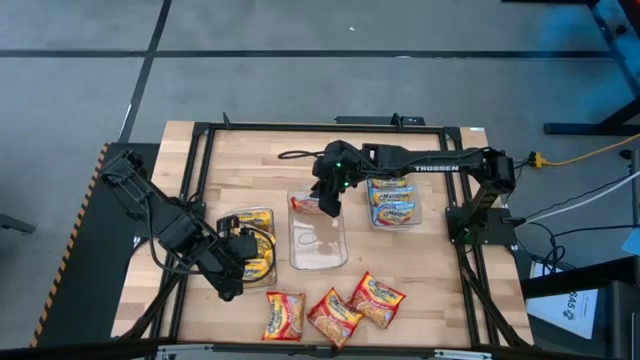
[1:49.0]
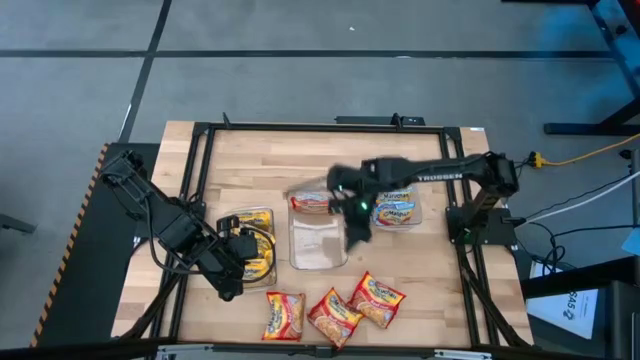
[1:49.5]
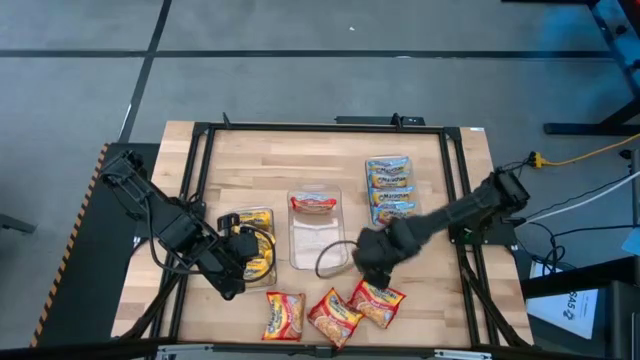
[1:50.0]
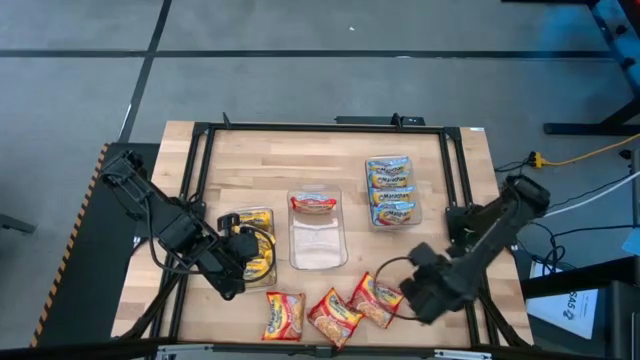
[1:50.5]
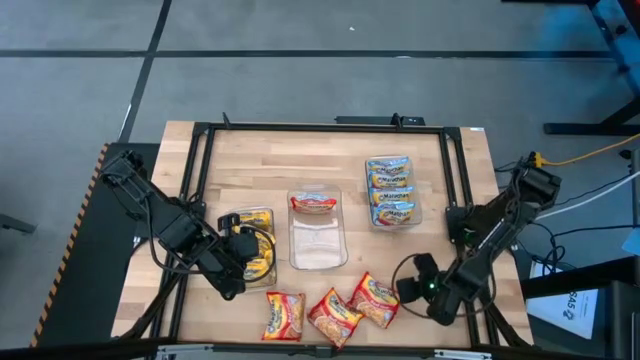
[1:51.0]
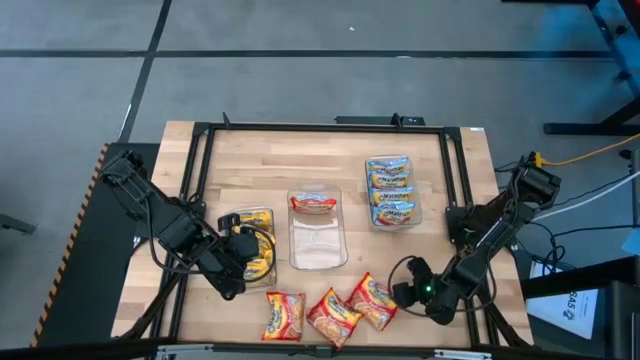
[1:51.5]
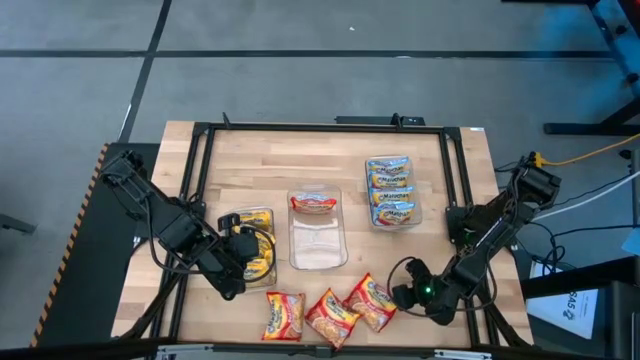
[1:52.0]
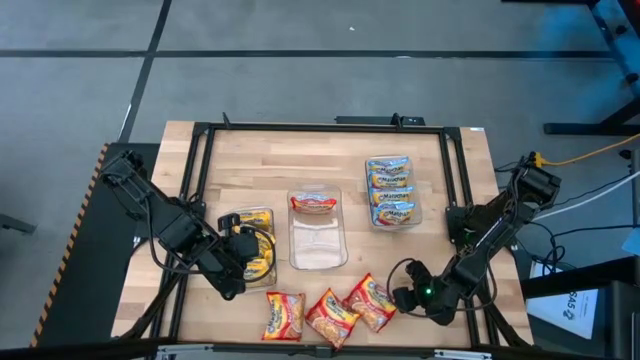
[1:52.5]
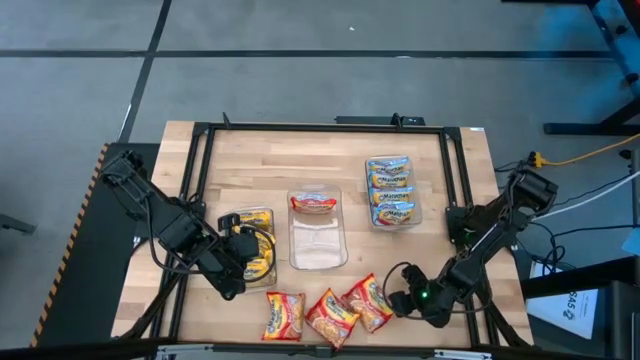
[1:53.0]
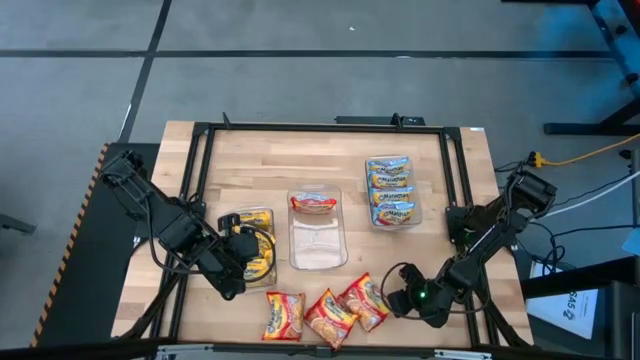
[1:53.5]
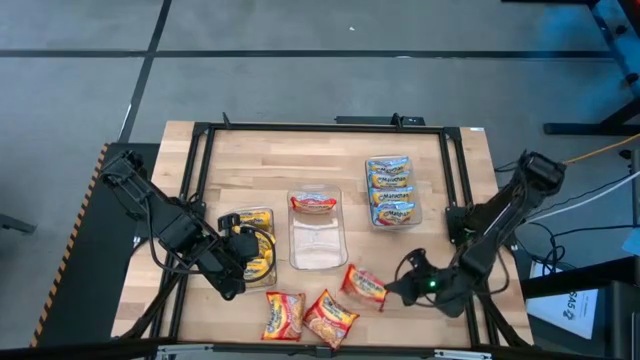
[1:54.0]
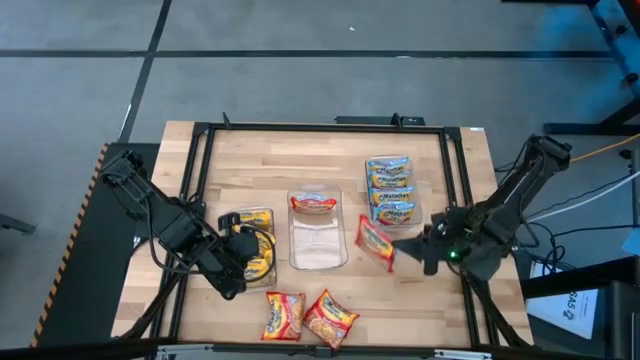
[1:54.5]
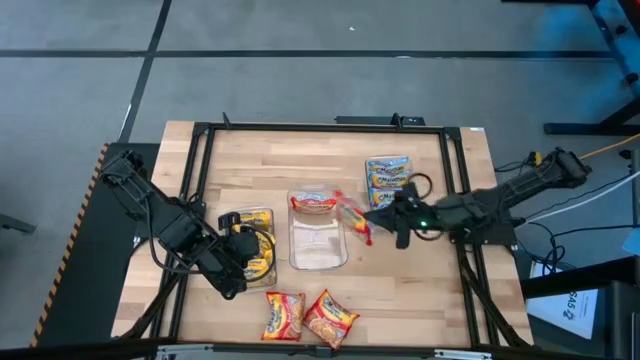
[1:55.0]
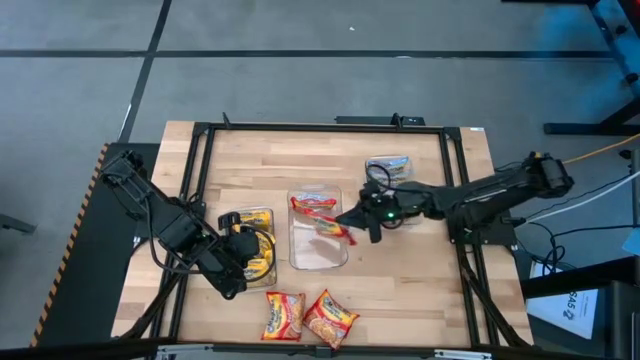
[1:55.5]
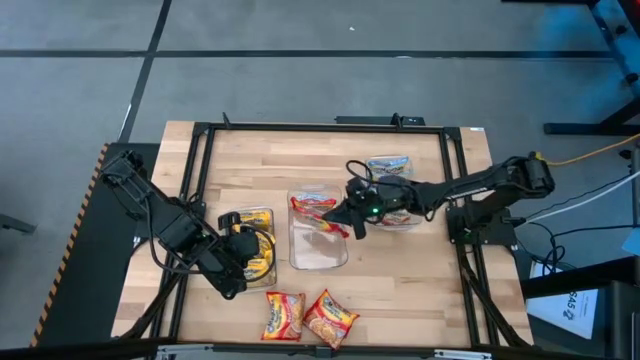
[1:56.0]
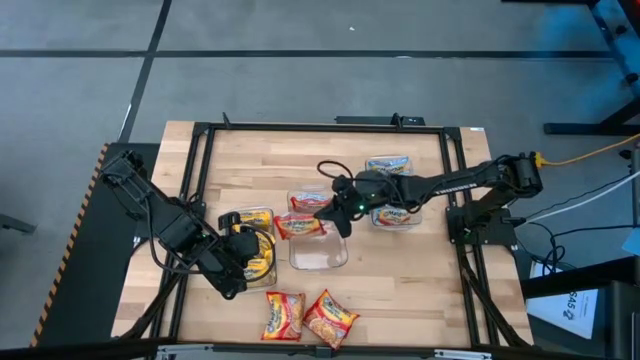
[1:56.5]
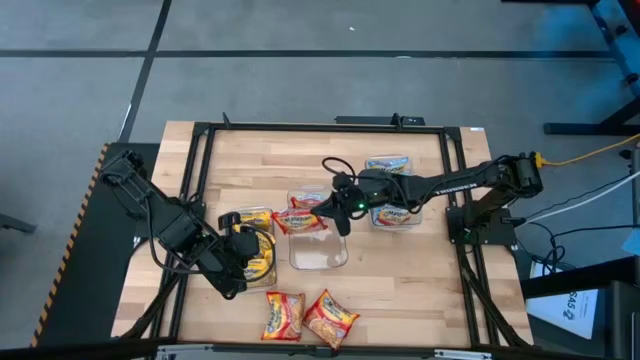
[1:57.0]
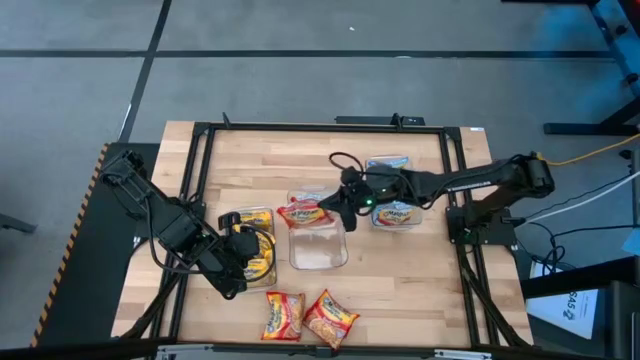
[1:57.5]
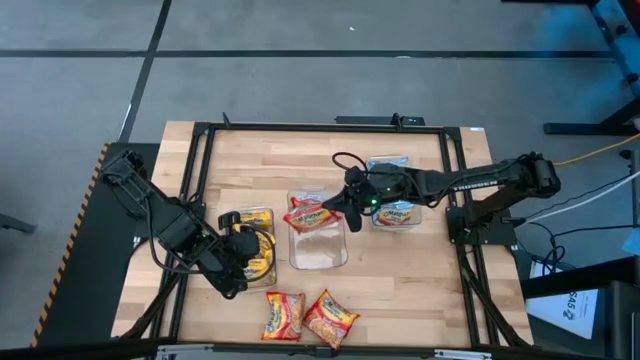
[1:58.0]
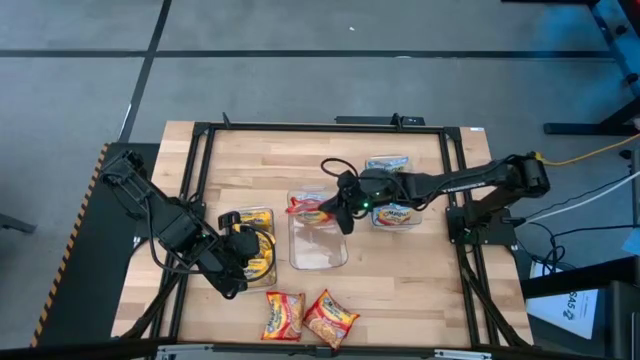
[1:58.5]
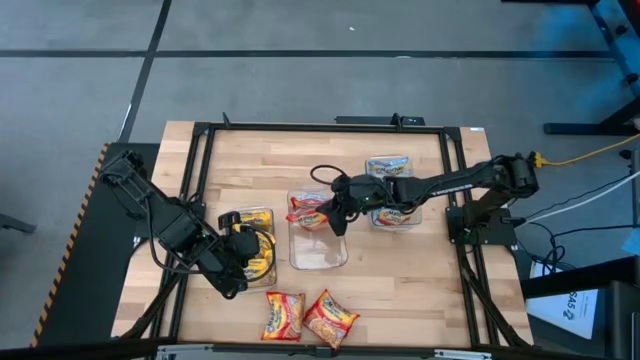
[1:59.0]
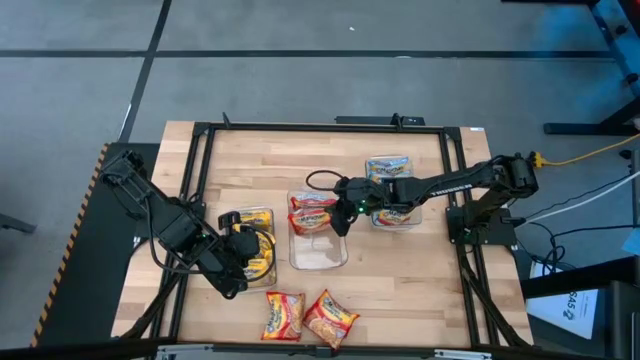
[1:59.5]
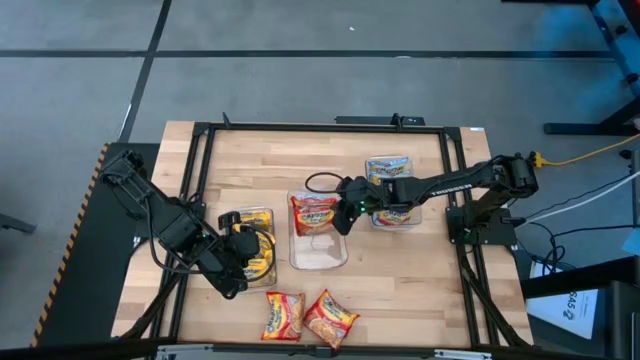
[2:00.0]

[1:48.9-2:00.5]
Task: Sort Maruchan noodles
Put the red noodle pack into the middle transparent bin

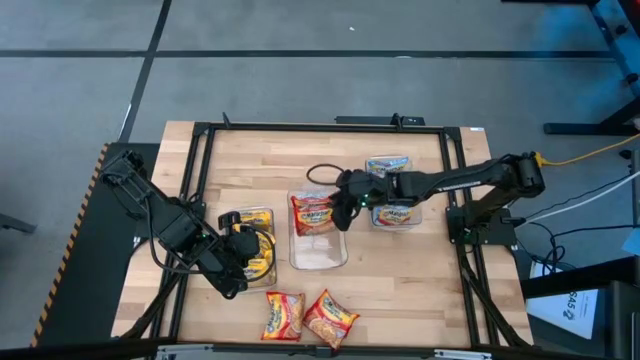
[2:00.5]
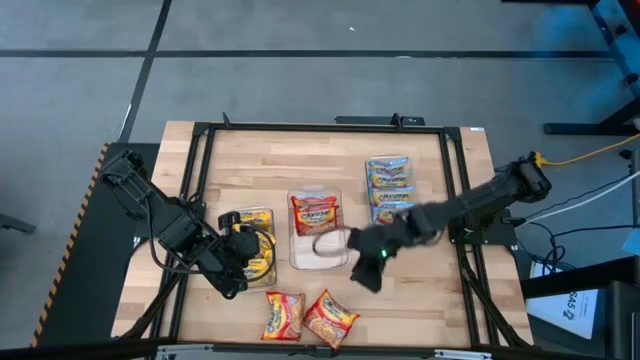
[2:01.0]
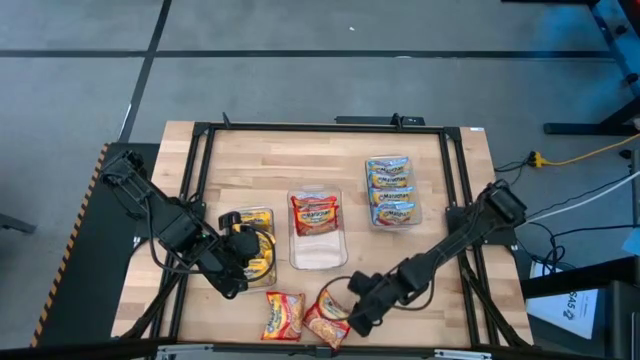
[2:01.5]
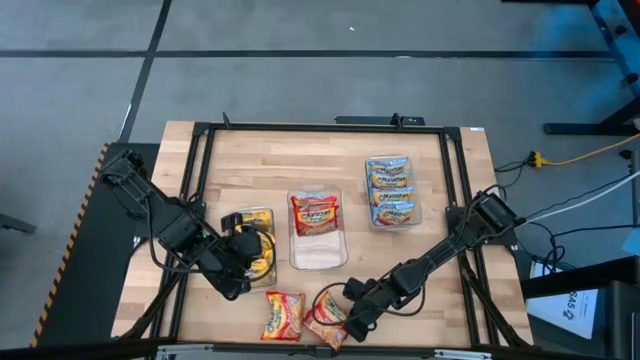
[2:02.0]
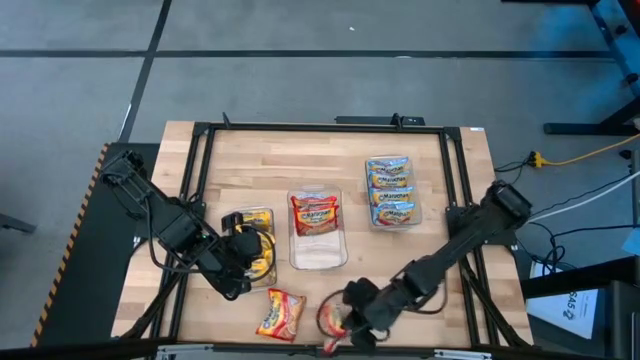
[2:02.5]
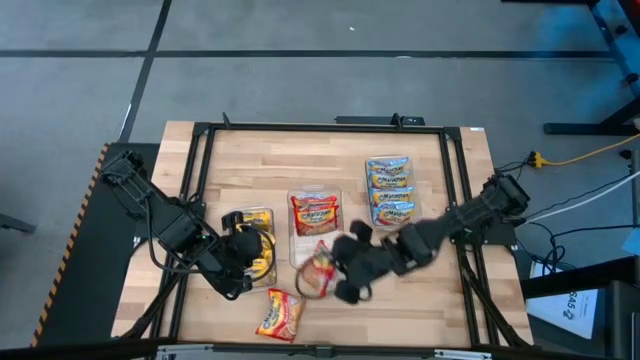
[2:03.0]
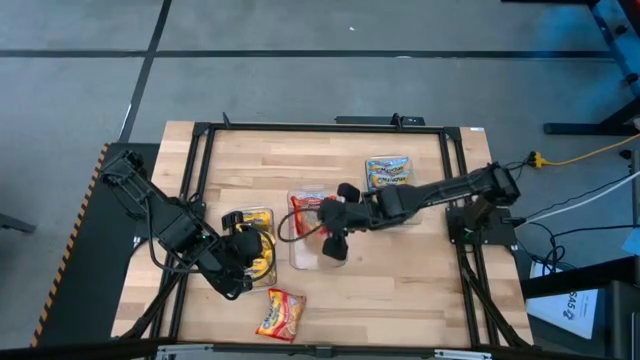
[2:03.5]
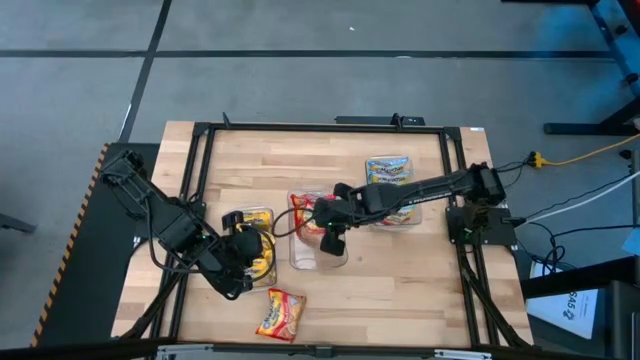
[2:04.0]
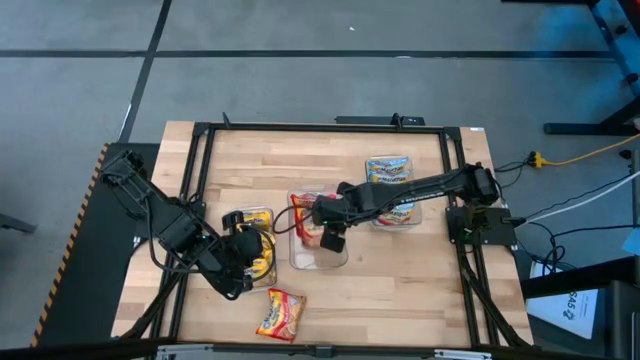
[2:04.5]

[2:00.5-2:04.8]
Put the red noodle pack into the middle transparent bin

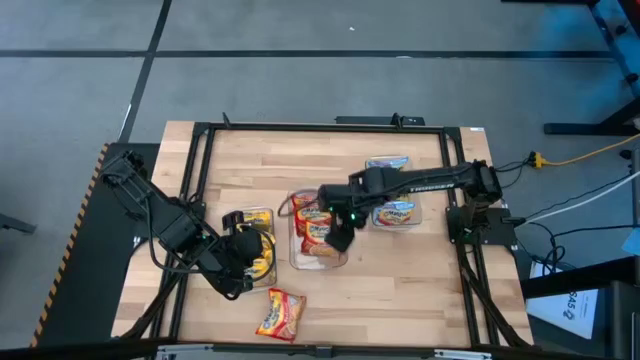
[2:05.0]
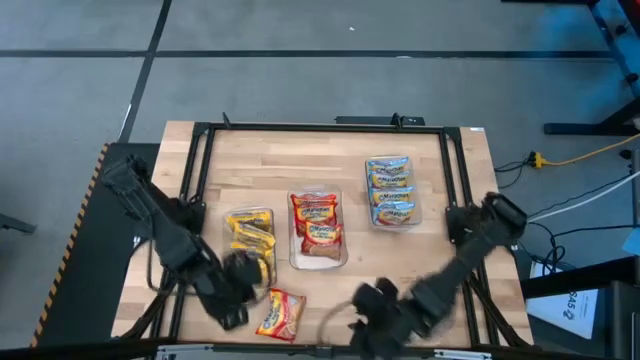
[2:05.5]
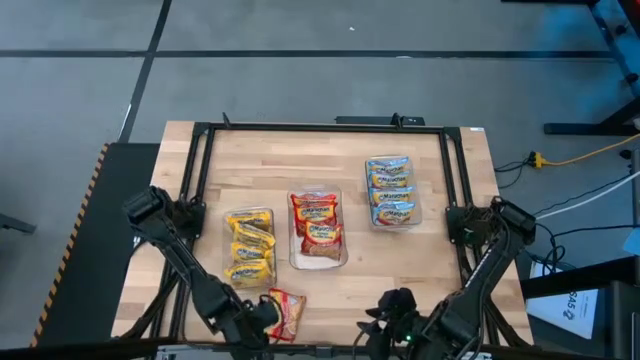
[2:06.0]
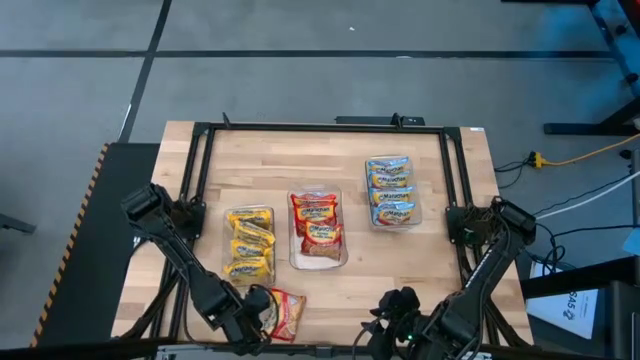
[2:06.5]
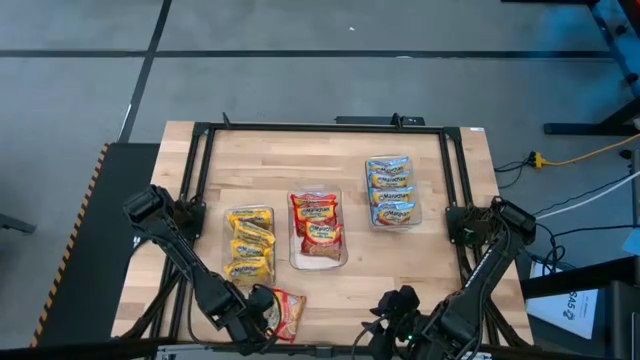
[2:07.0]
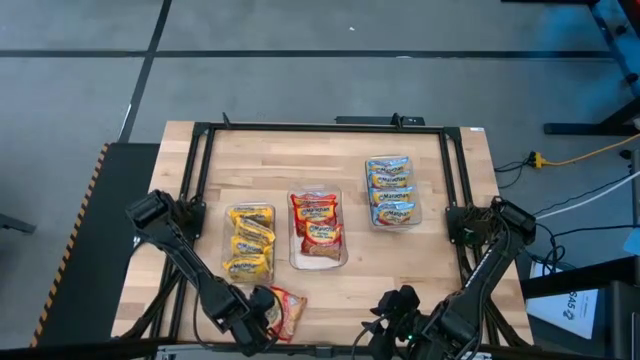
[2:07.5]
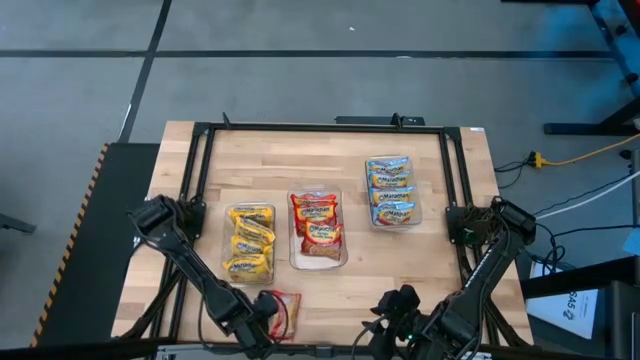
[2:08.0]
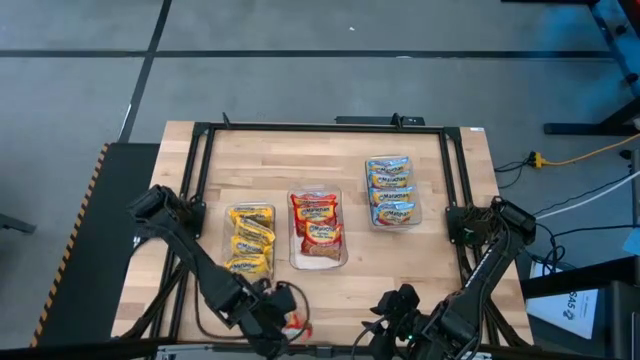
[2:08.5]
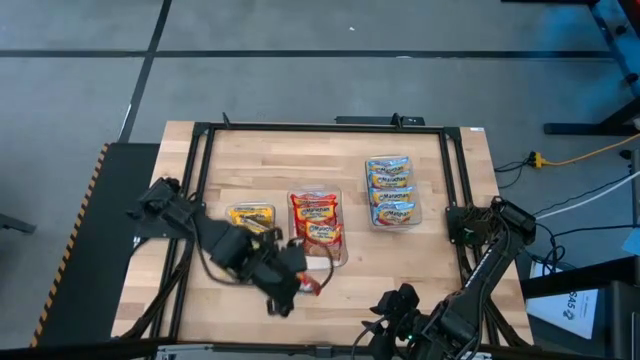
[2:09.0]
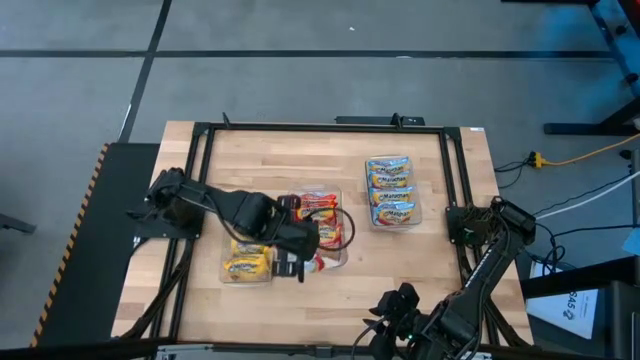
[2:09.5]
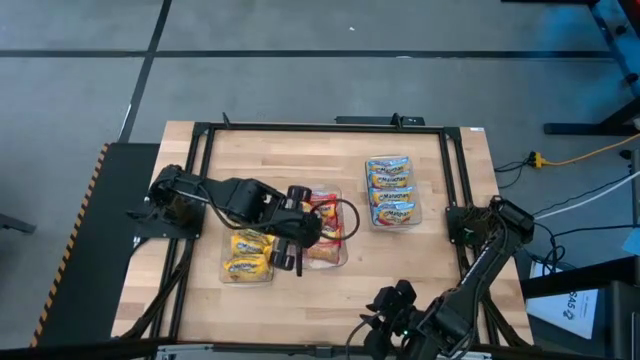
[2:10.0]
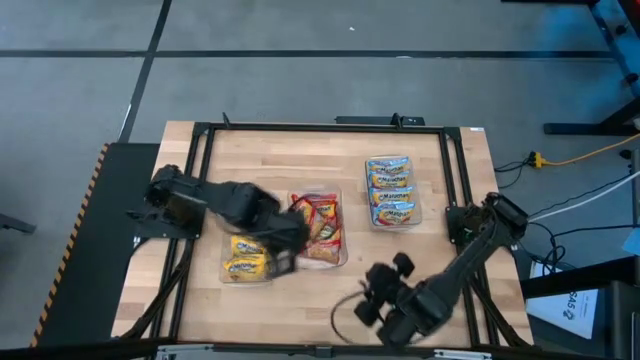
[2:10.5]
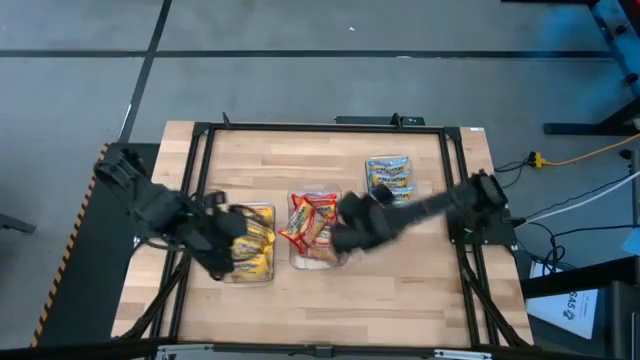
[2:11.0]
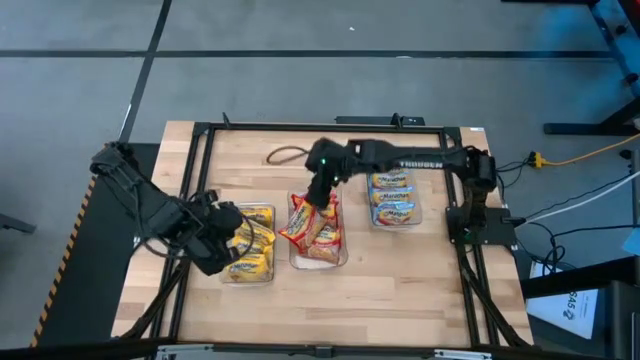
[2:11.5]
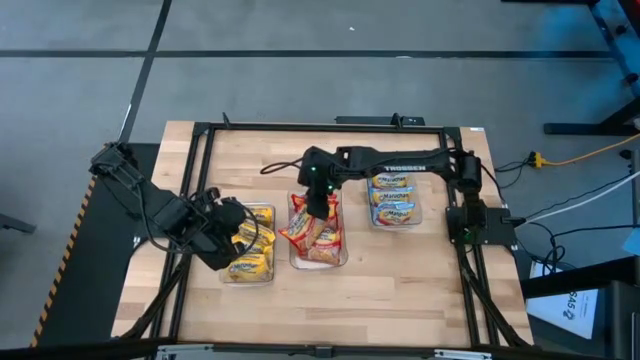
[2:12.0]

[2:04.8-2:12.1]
Put the red noodle pack into the middle transparent bin
